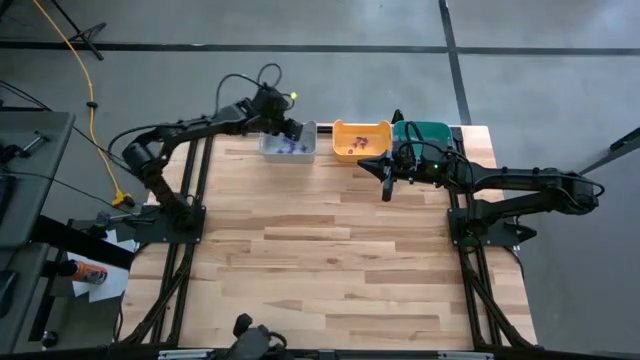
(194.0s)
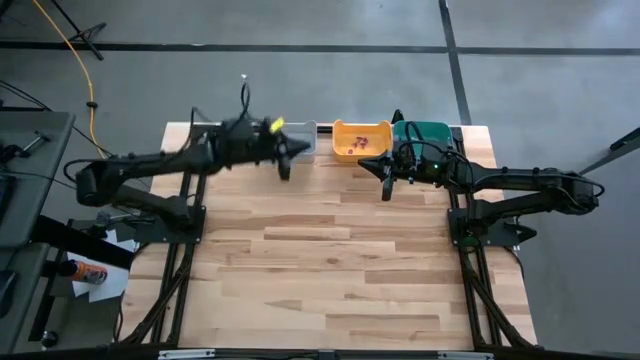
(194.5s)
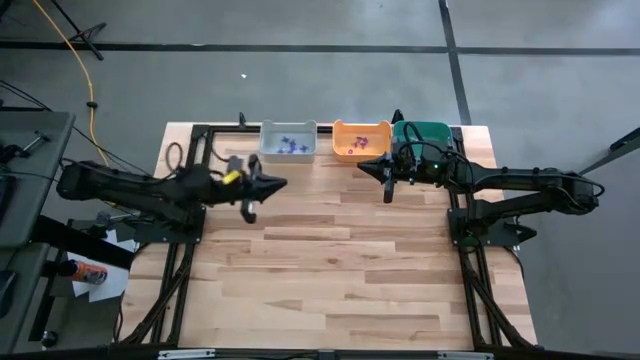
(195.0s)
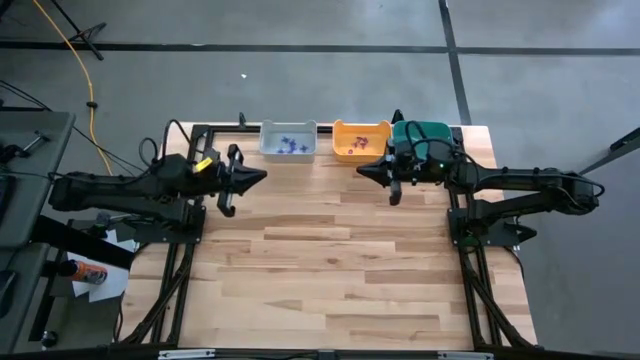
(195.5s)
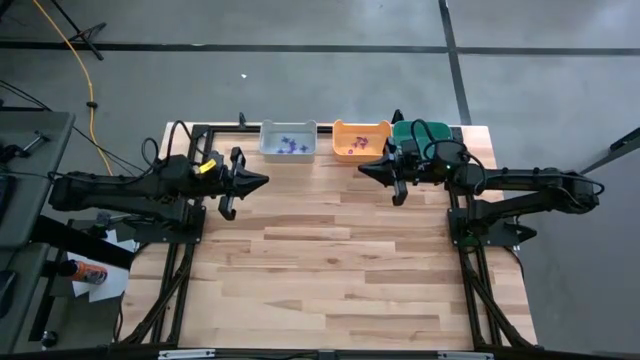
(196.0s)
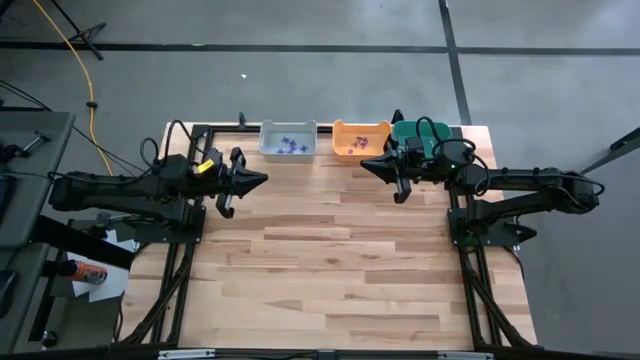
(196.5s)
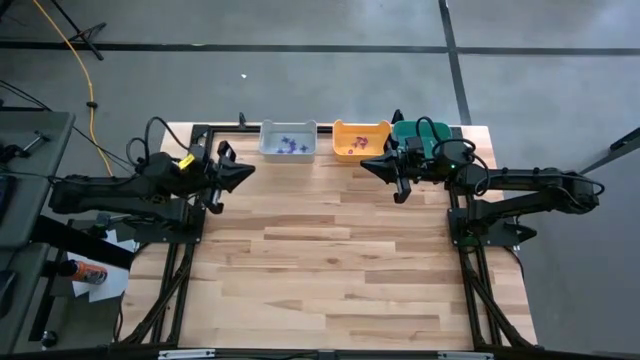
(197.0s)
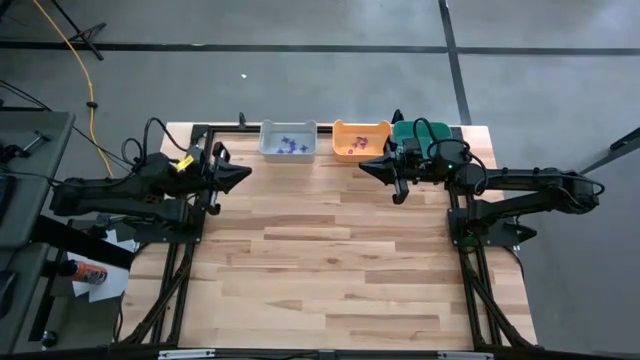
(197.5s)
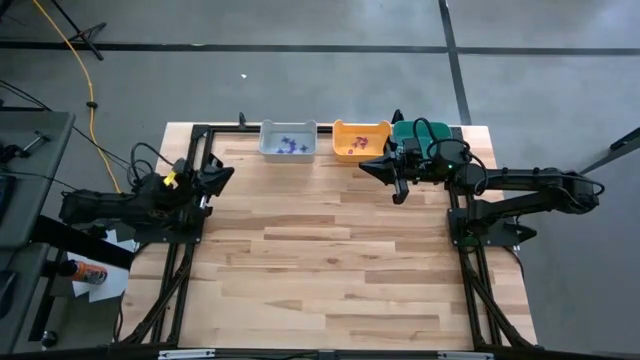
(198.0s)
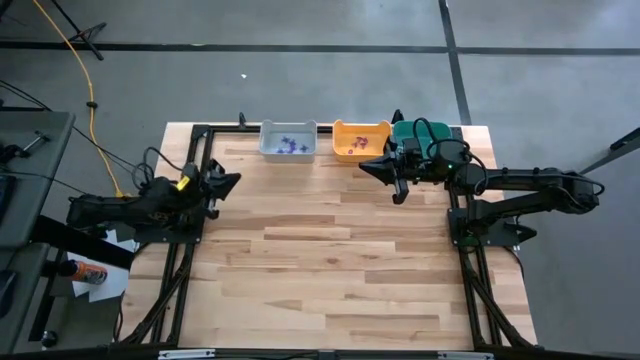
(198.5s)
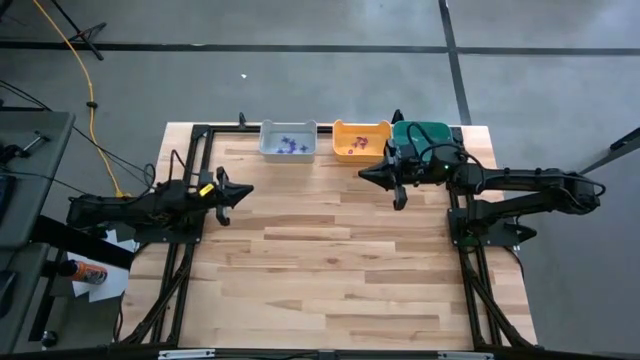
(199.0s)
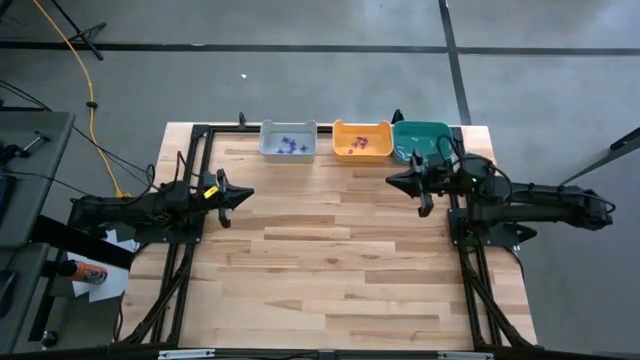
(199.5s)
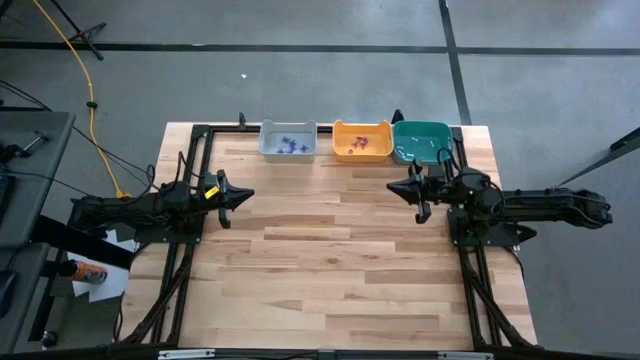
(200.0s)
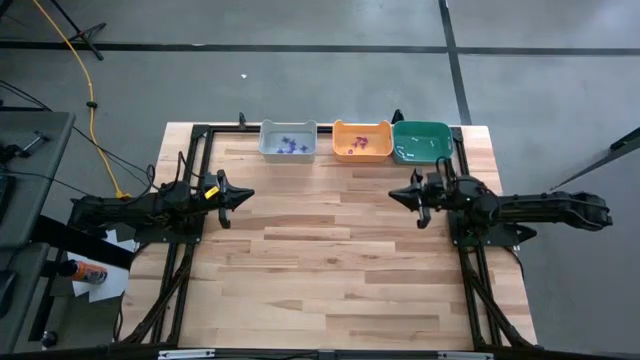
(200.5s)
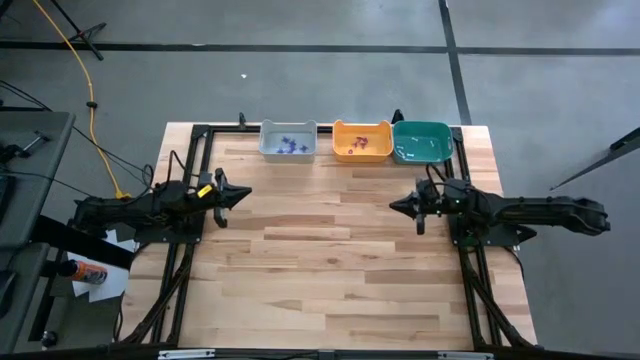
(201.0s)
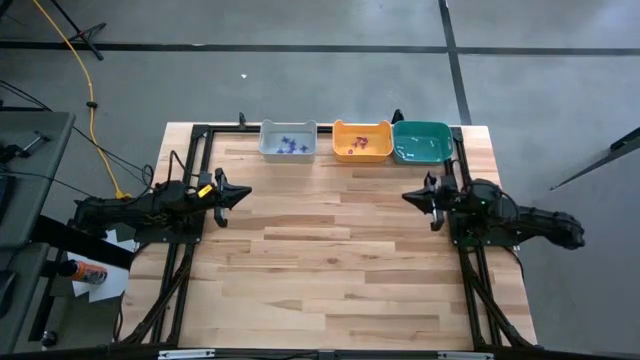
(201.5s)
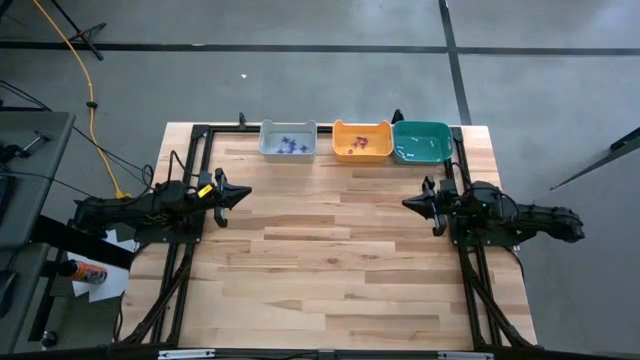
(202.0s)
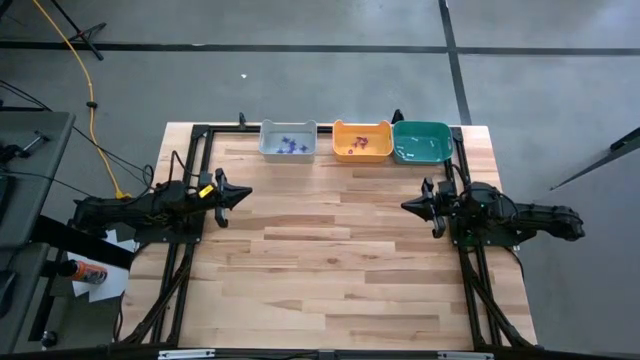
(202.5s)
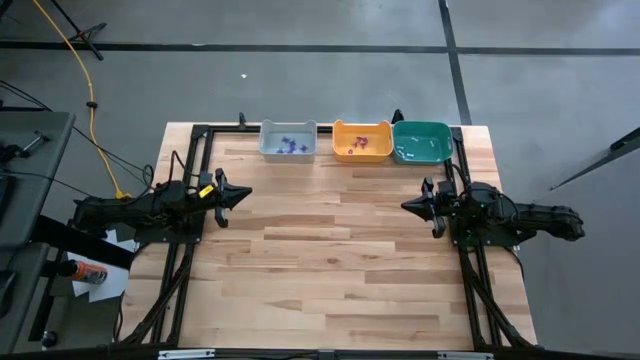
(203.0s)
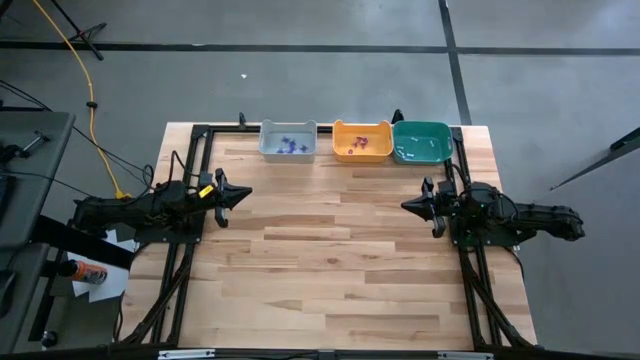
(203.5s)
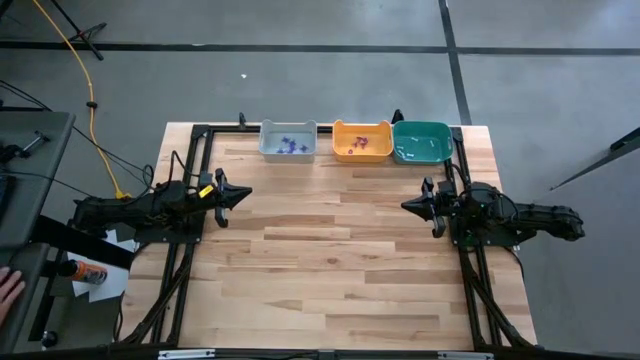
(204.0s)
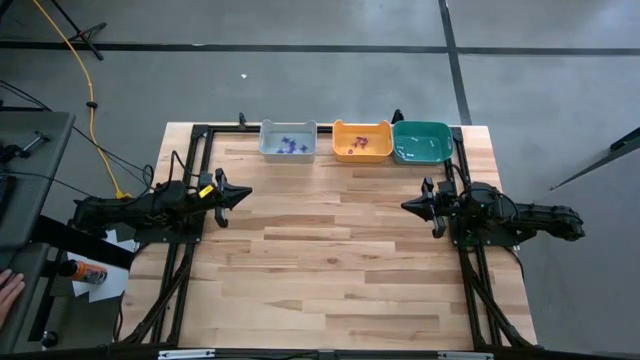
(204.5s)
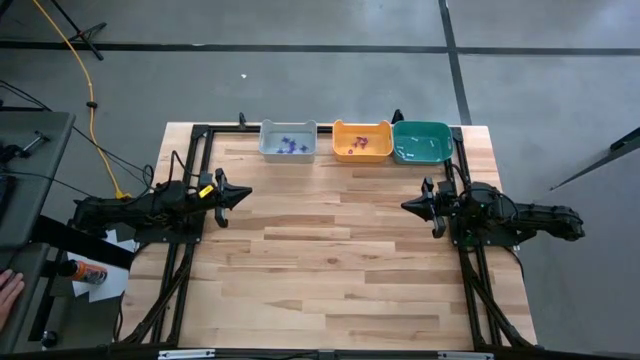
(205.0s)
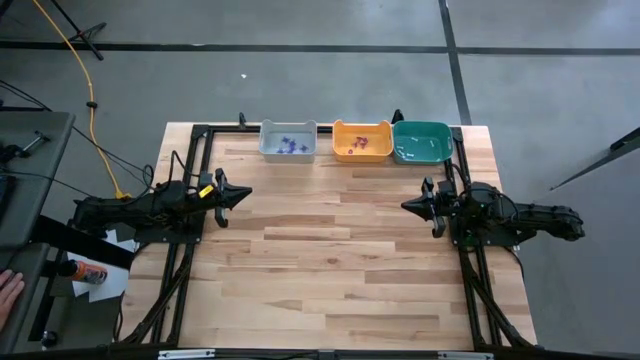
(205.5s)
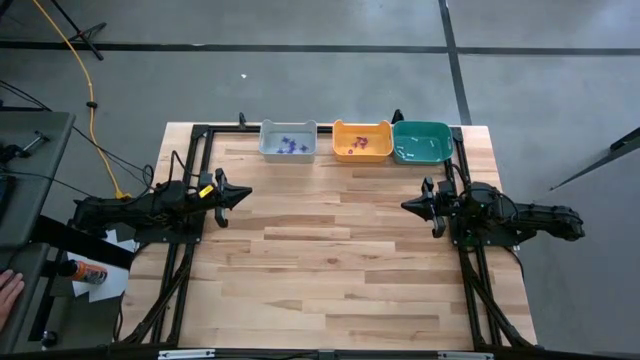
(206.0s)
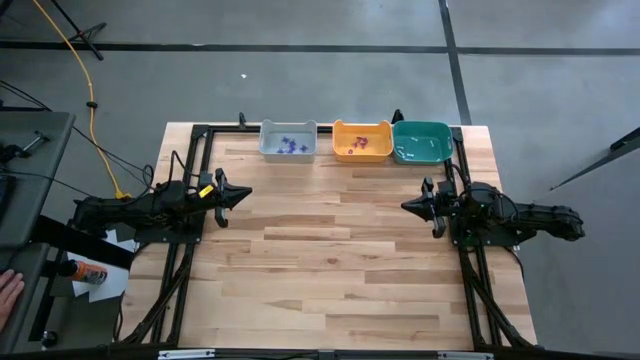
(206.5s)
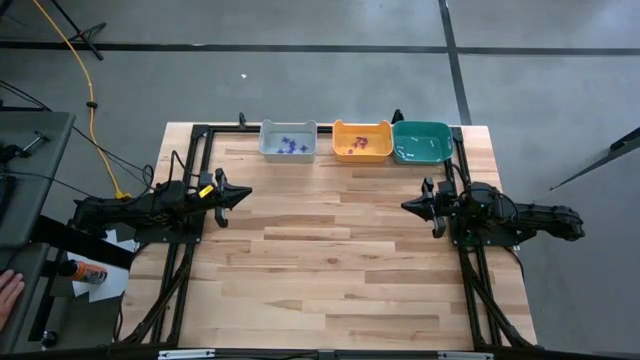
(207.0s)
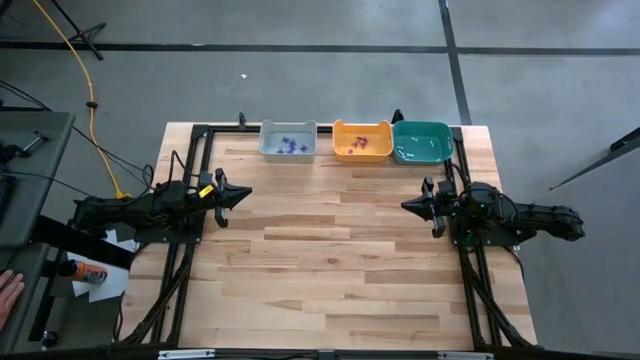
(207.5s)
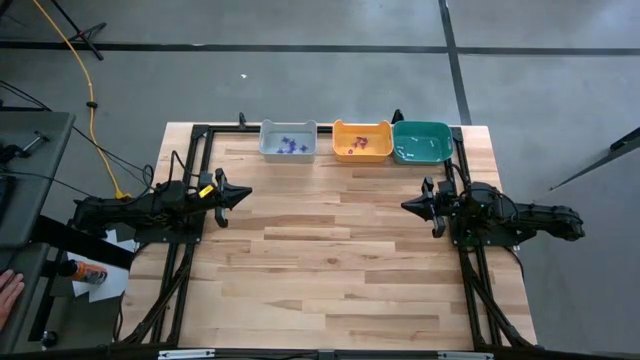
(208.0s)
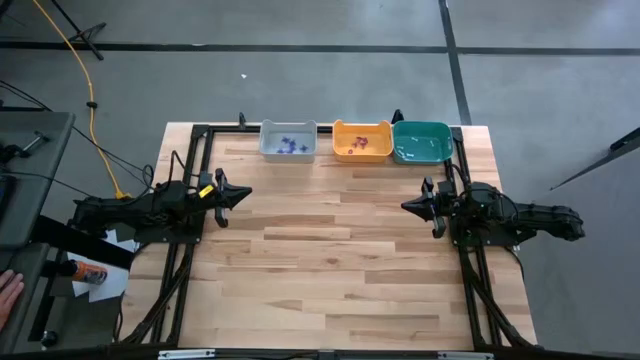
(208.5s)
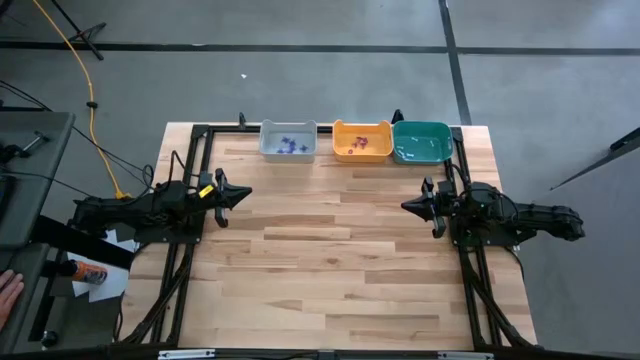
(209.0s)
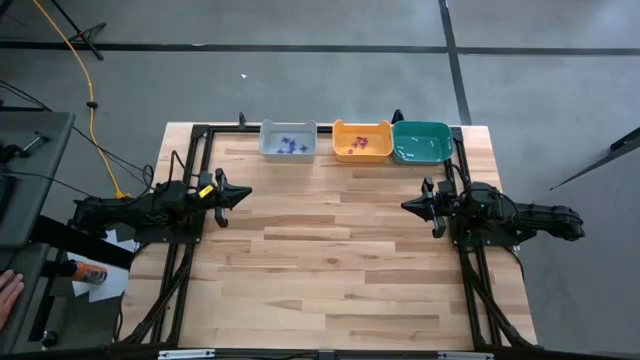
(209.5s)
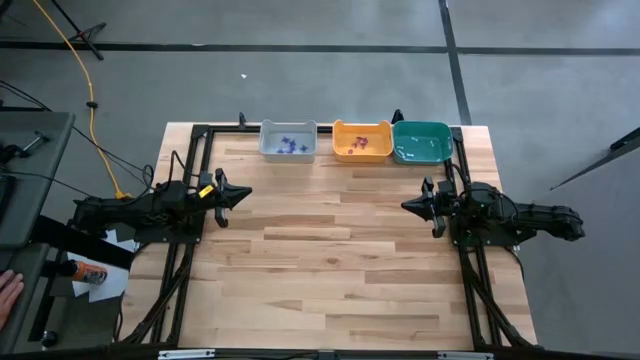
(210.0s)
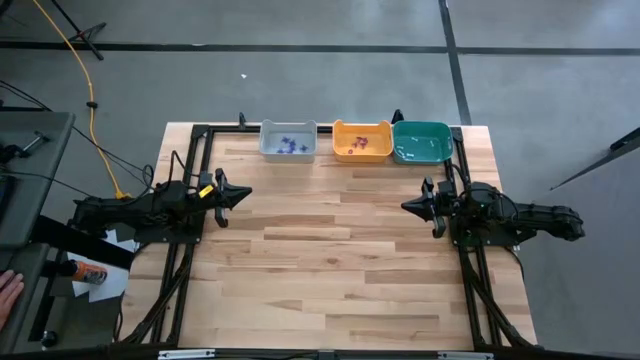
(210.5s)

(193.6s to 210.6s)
Task: Sort Halloween decoration
Return to Home Position

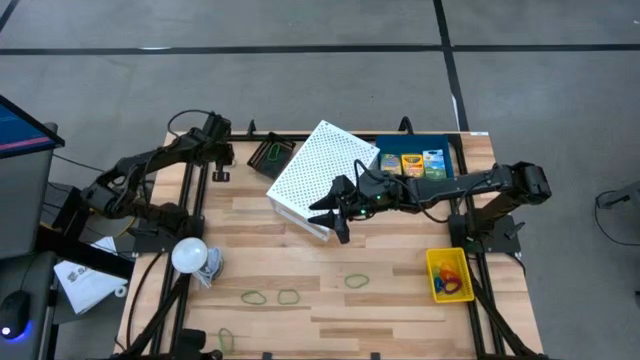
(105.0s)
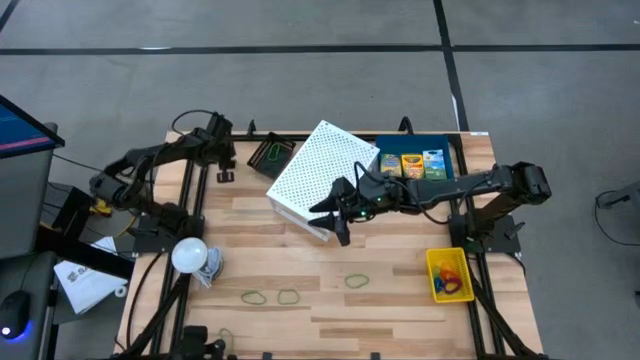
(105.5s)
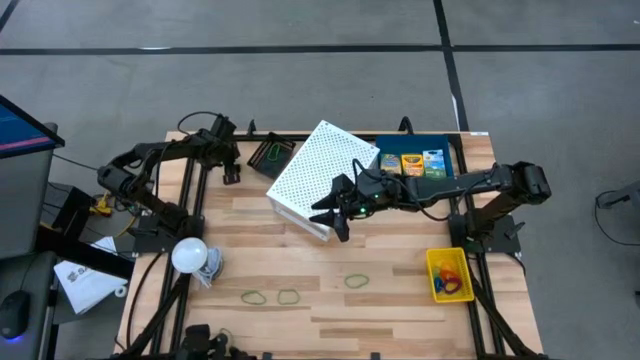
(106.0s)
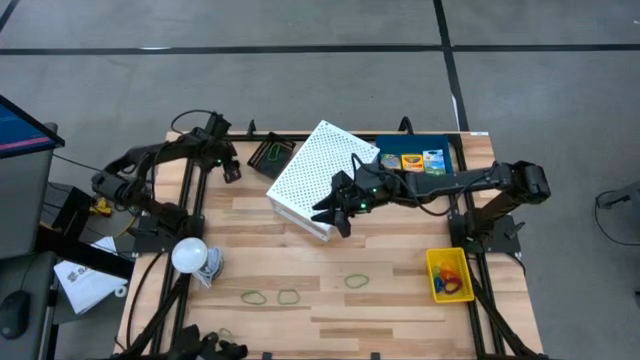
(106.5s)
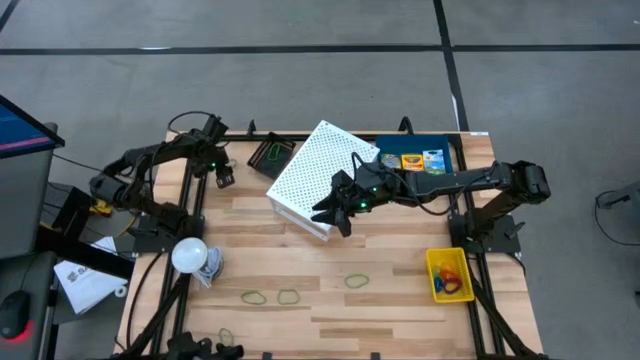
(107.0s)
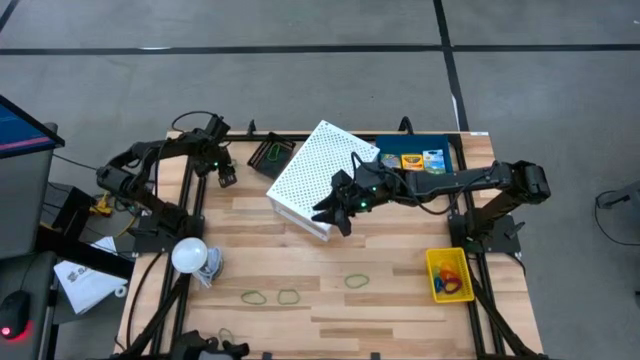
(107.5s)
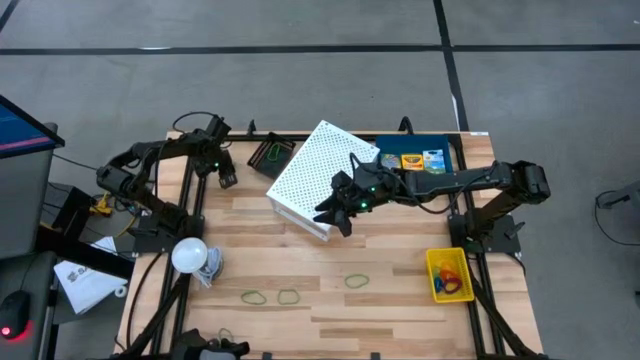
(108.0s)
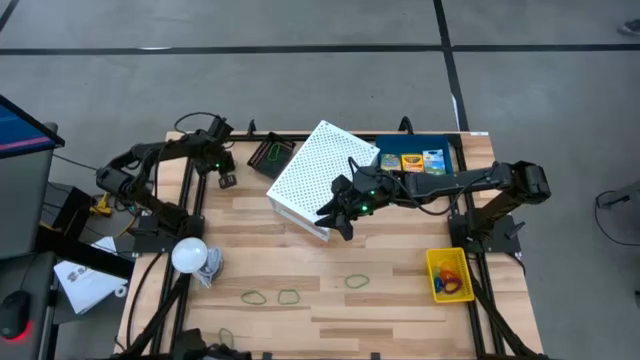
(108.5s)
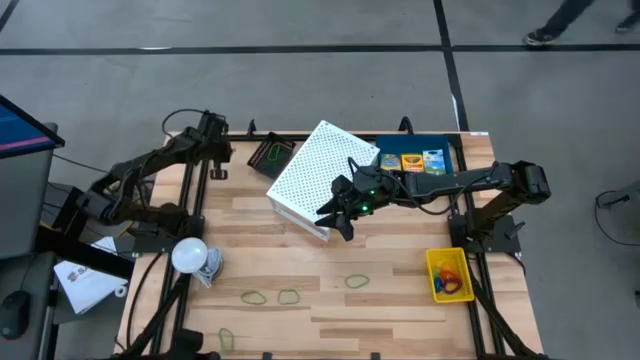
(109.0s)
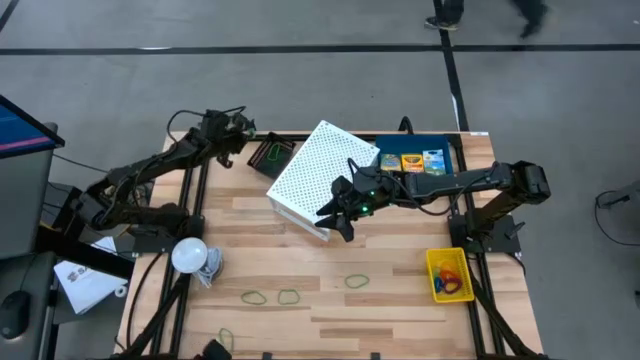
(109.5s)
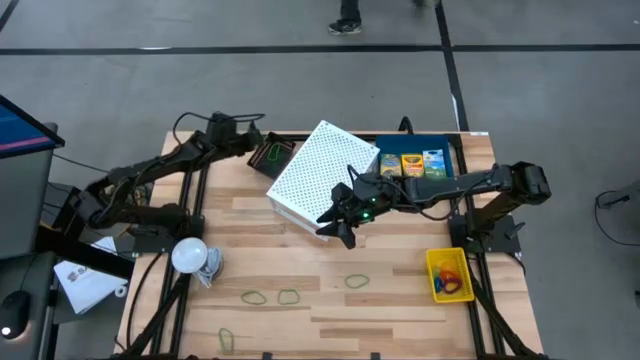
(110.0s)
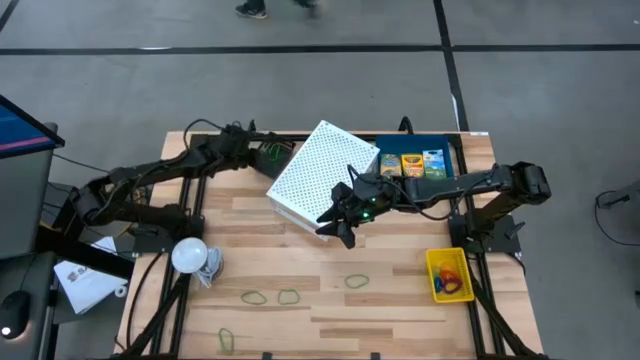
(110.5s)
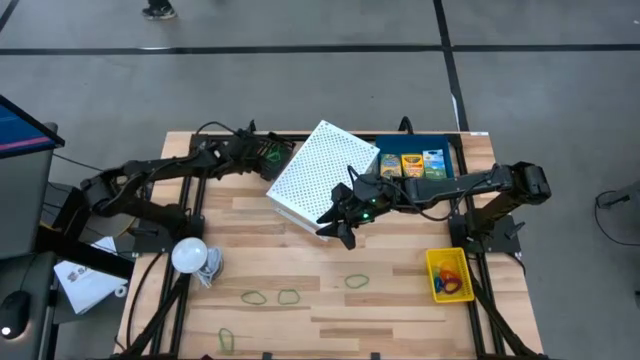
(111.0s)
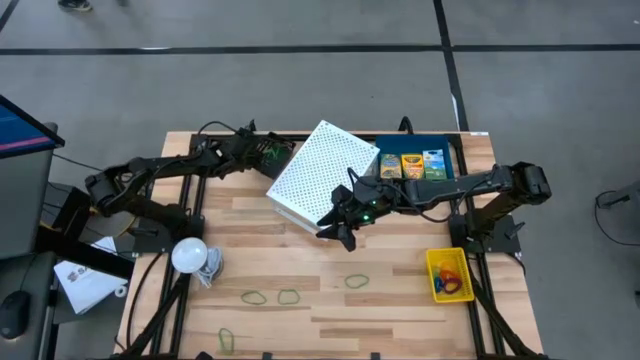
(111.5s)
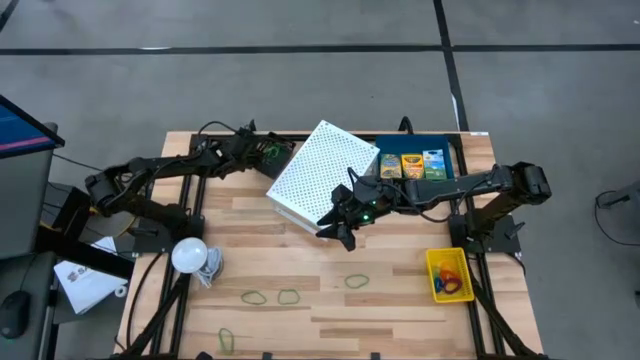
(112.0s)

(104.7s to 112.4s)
Task: Pick & Place Office Desk Supplies
Put the green rubber band into the black bin
